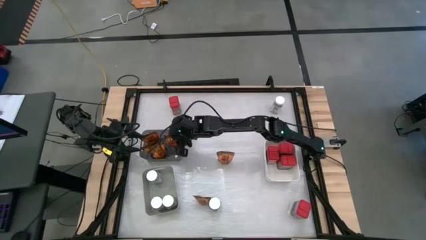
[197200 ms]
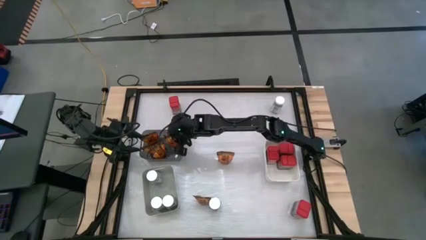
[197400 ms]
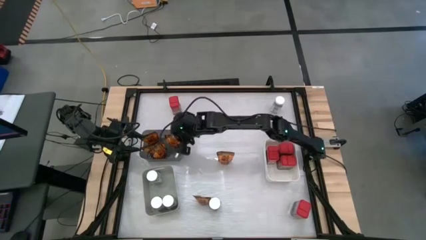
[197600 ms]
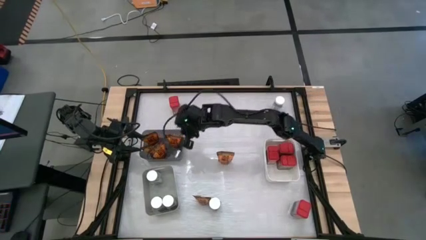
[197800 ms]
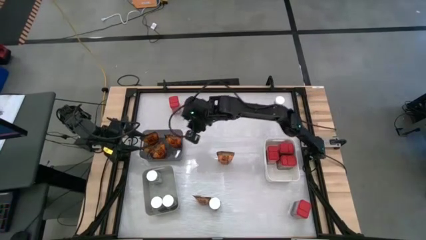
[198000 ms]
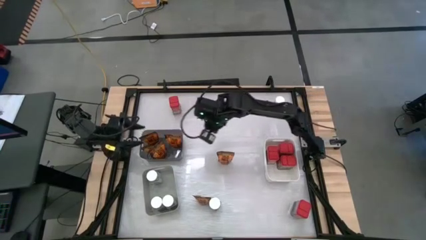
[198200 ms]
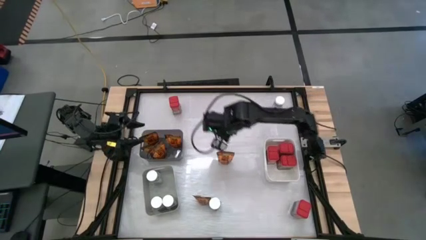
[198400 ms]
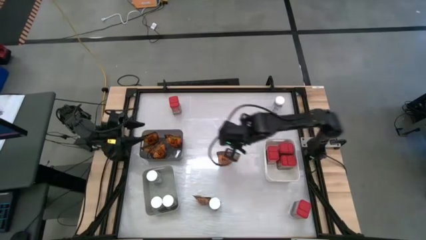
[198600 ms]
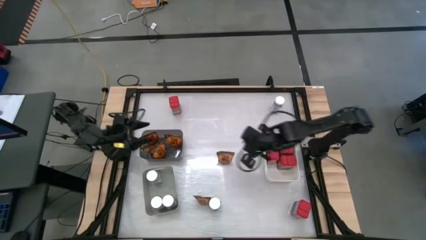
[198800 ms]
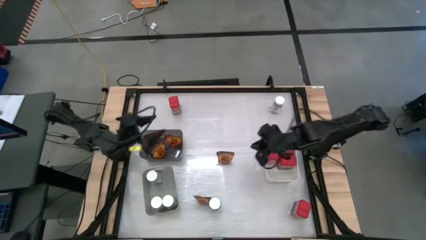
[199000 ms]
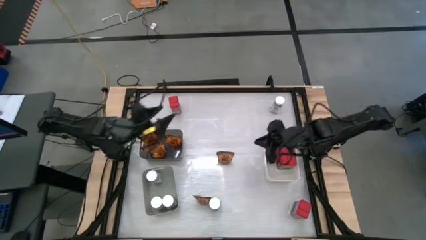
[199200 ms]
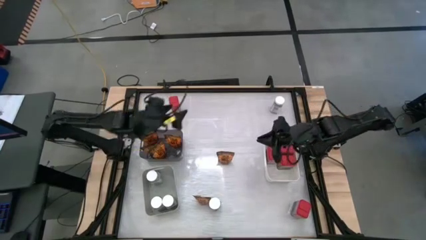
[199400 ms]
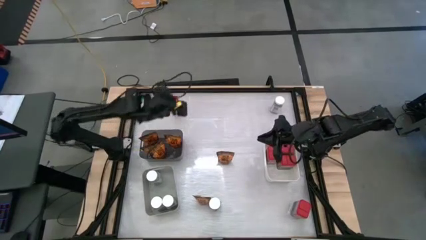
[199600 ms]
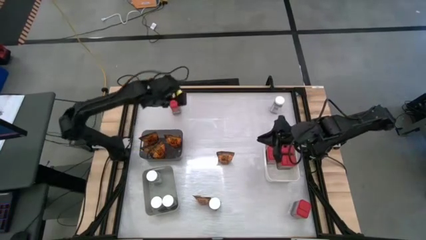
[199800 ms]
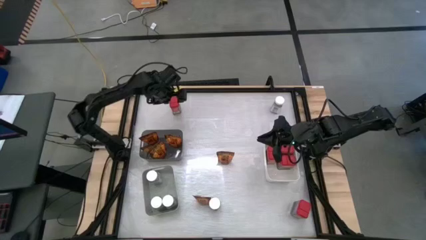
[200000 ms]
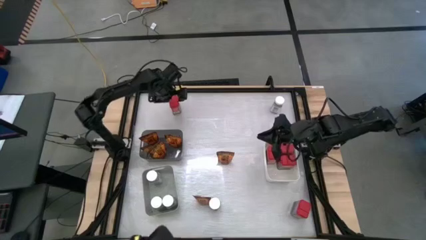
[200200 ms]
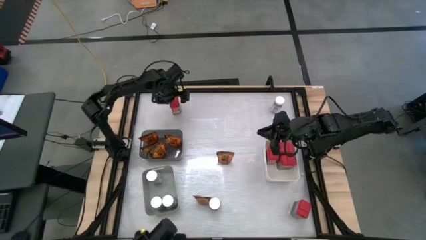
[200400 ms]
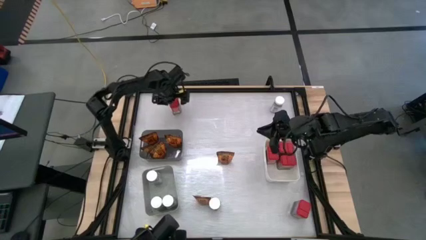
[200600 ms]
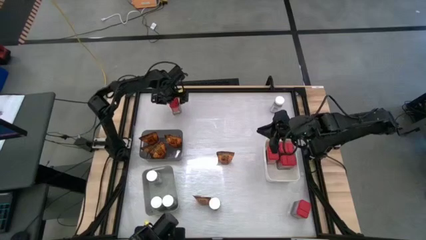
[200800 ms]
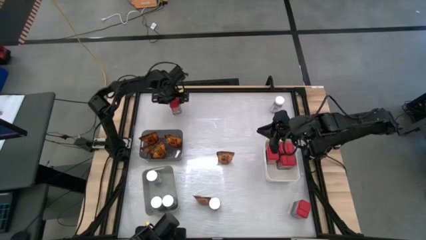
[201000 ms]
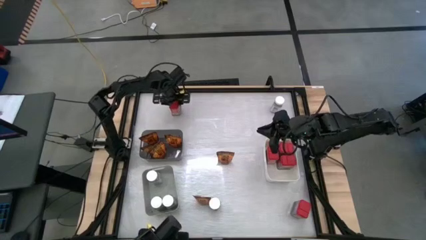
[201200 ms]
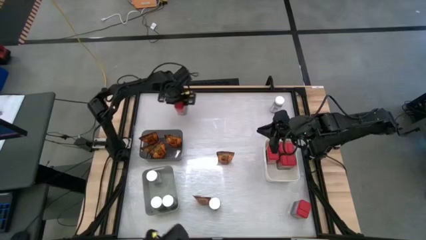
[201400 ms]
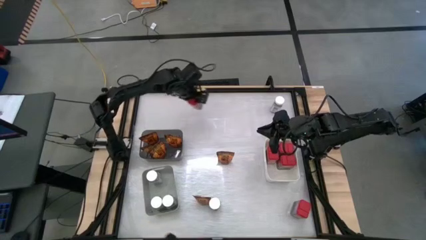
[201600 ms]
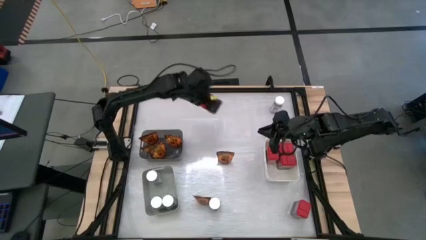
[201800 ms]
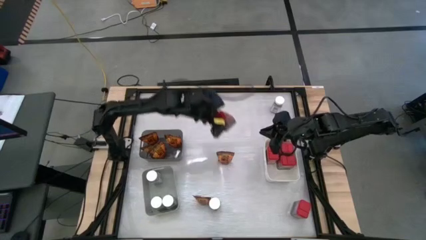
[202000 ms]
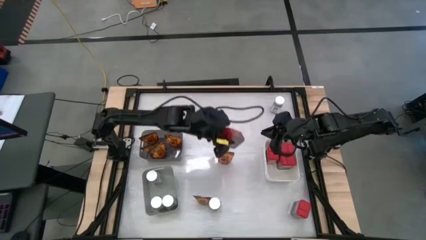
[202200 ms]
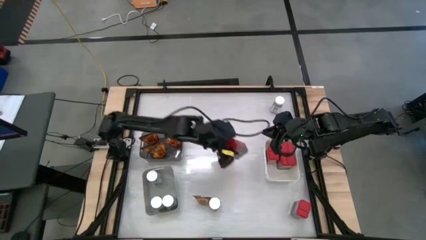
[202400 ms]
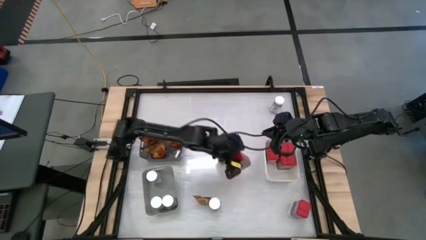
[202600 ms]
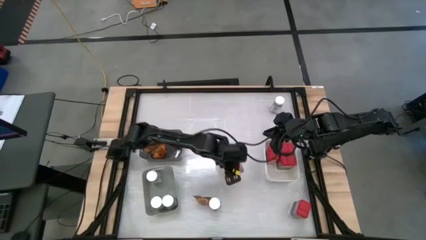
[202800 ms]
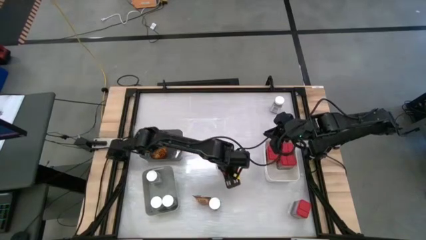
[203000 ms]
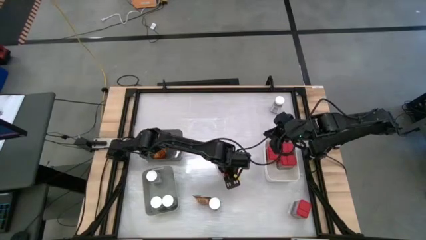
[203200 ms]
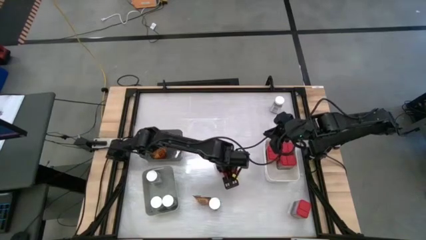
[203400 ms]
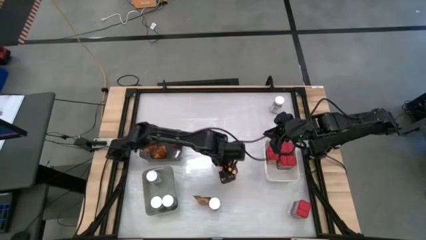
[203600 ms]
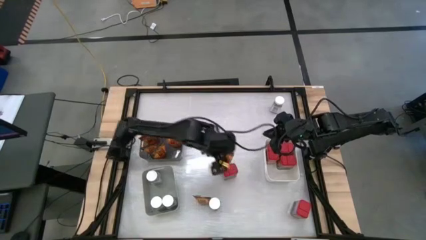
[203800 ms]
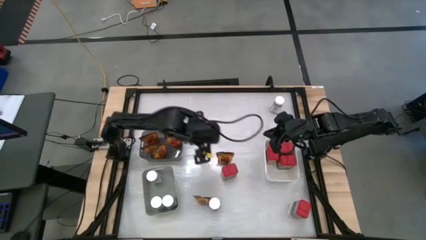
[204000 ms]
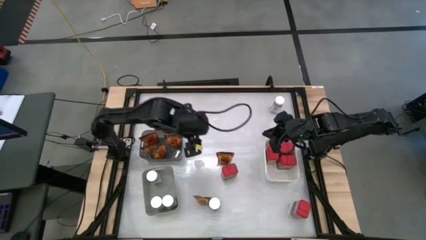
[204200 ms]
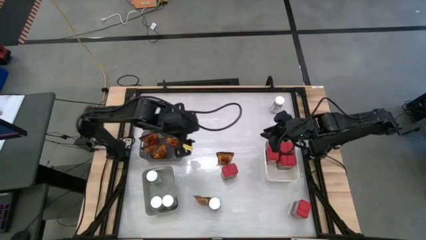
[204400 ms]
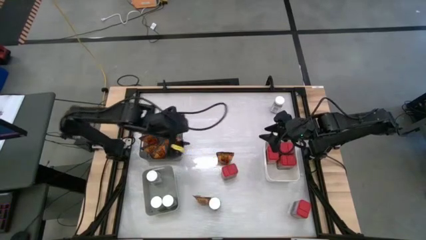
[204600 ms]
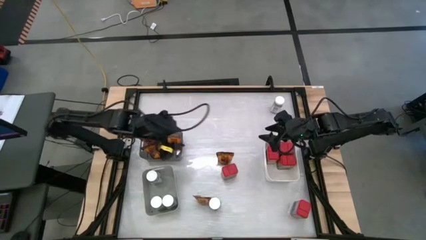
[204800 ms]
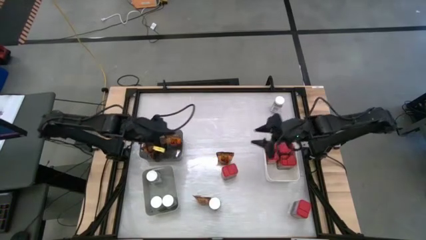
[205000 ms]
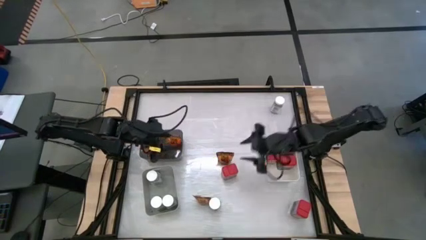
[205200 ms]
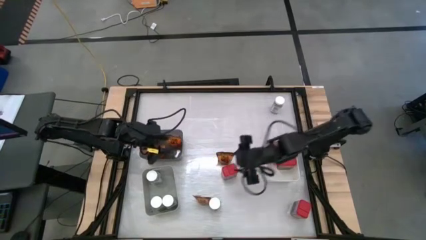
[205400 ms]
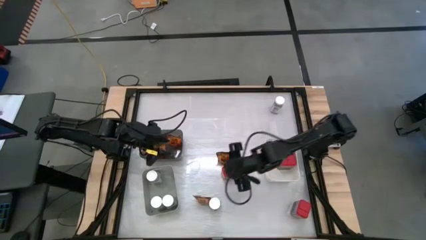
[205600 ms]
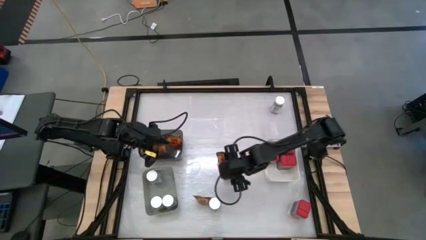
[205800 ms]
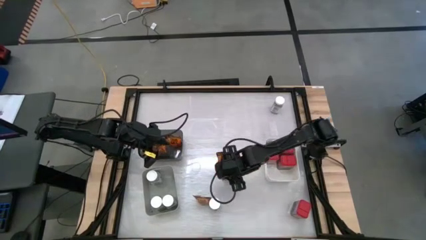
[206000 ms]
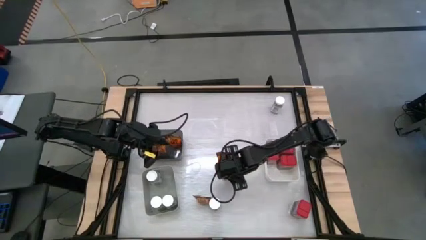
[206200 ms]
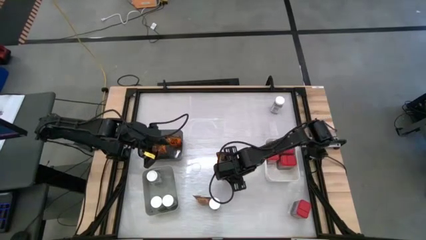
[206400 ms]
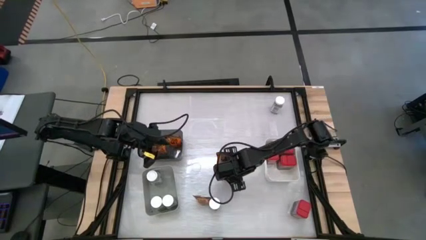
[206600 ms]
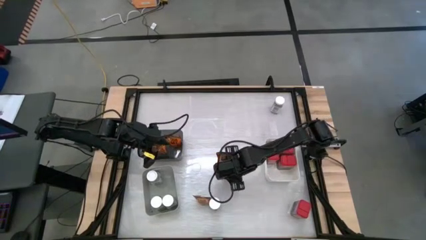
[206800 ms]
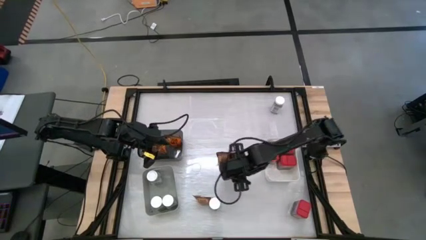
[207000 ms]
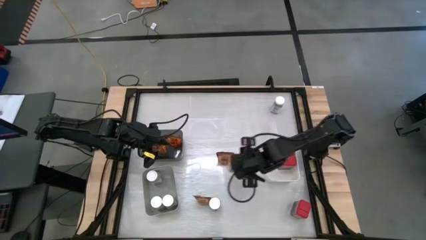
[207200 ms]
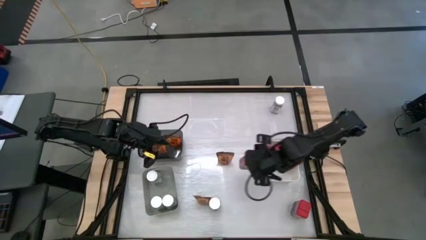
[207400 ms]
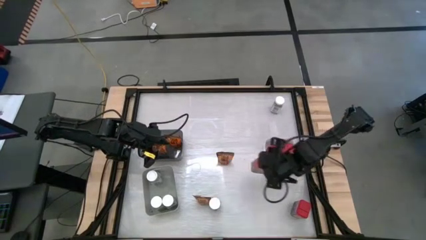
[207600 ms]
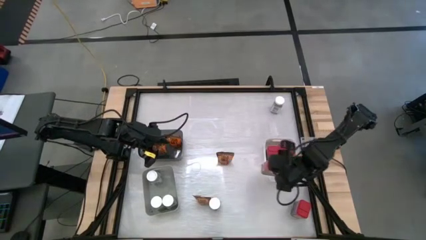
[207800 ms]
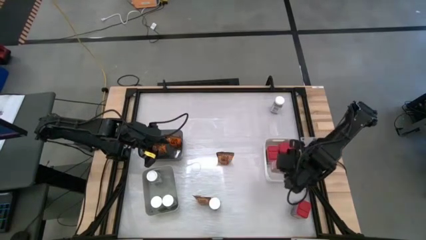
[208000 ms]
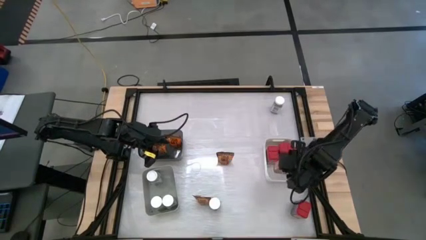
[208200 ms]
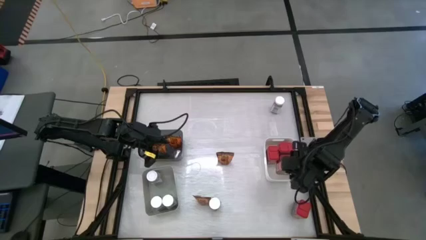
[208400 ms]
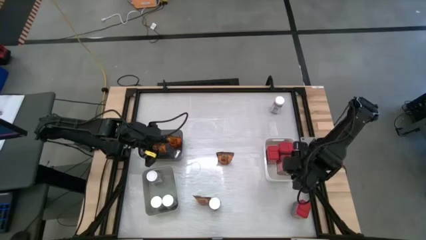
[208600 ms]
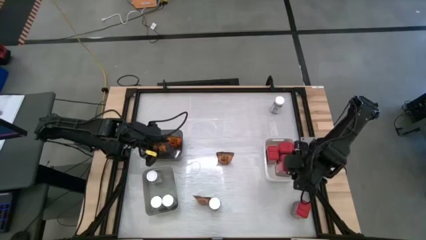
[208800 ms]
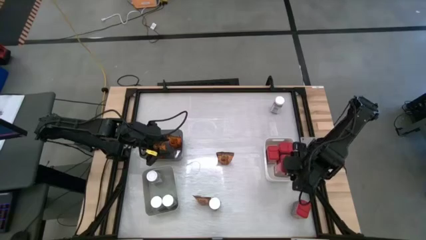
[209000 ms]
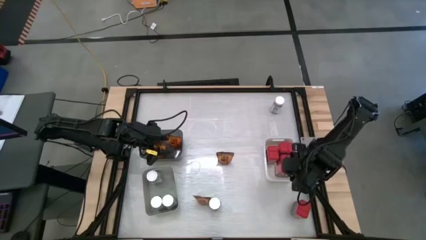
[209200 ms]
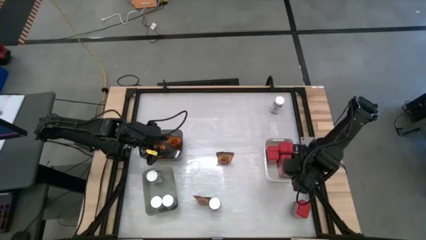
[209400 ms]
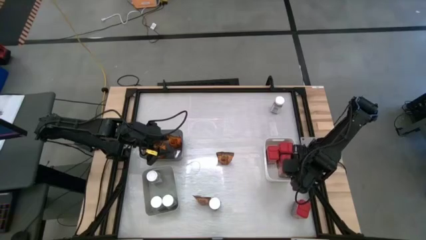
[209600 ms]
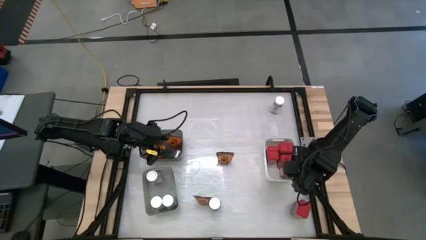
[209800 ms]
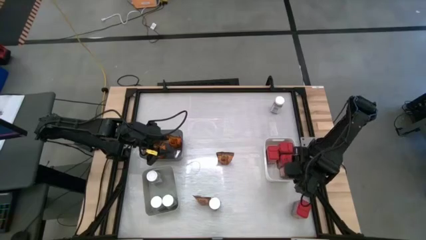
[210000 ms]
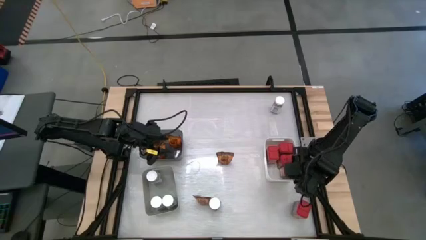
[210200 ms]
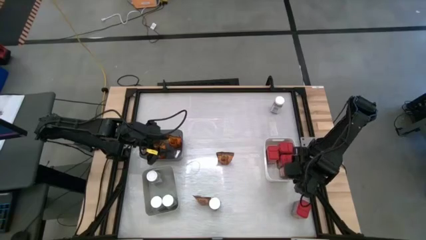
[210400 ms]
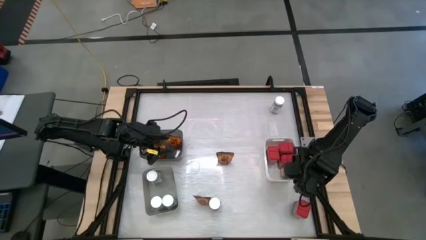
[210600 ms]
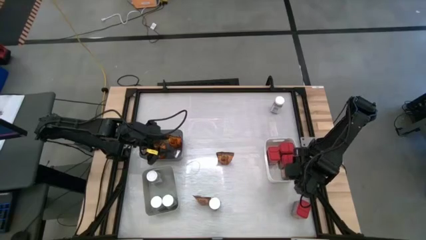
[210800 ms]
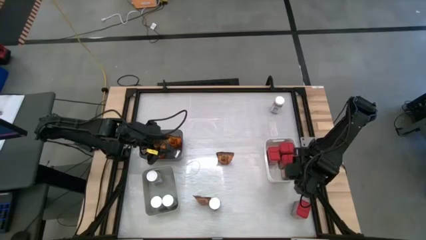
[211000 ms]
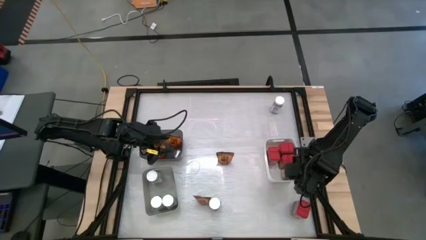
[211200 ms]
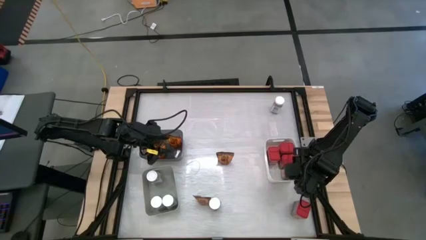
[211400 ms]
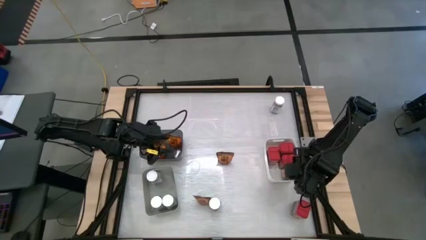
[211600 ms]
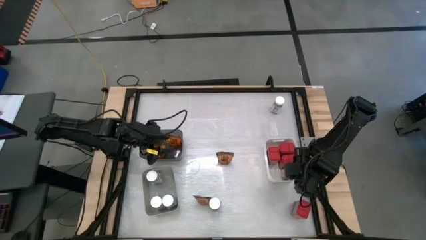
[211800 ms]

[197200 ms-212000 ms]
Task: Sort spices by type
Put the red spice can into the white bin
